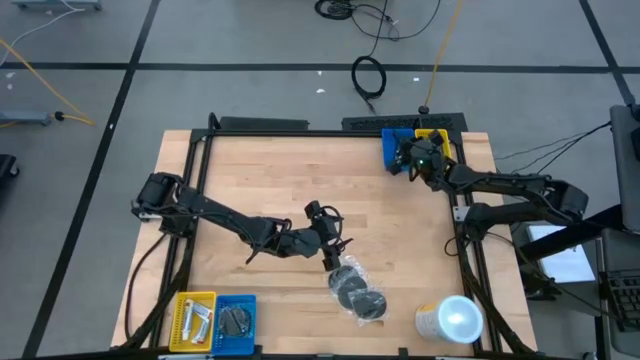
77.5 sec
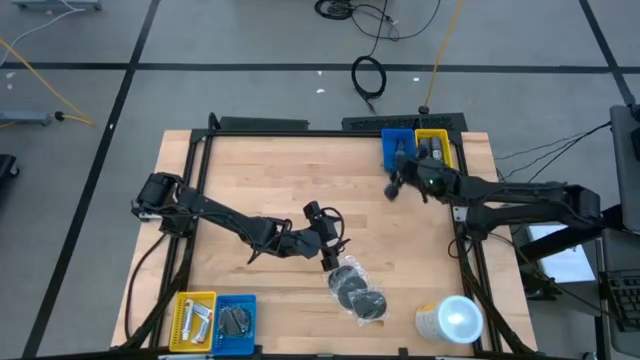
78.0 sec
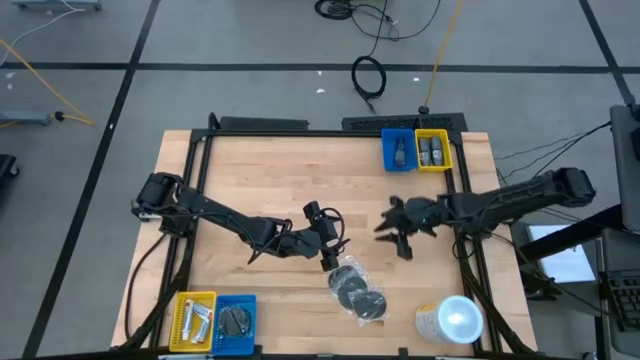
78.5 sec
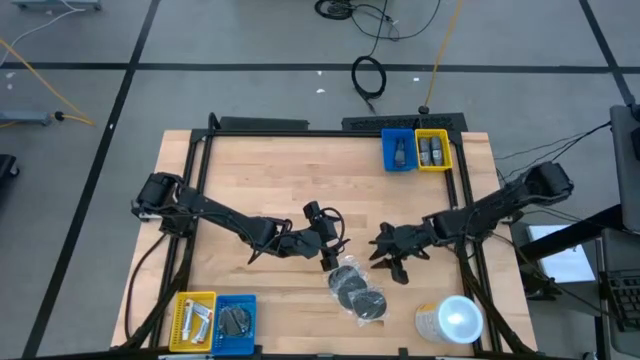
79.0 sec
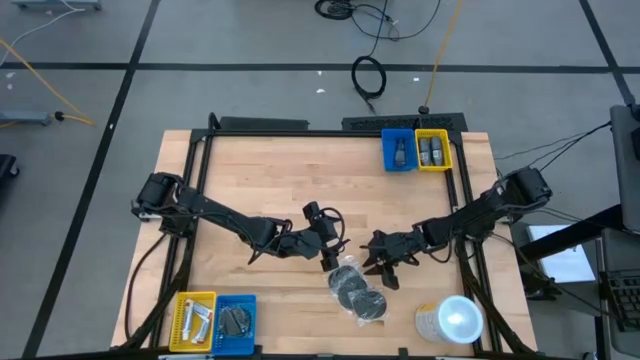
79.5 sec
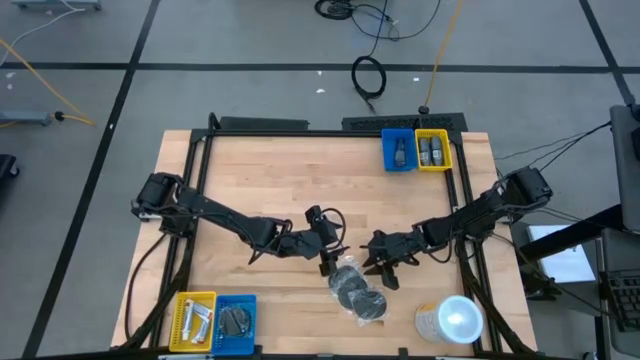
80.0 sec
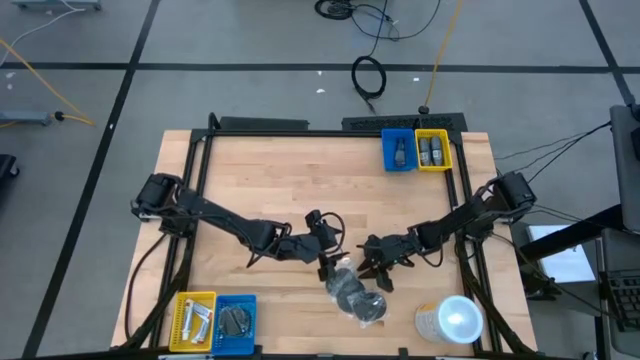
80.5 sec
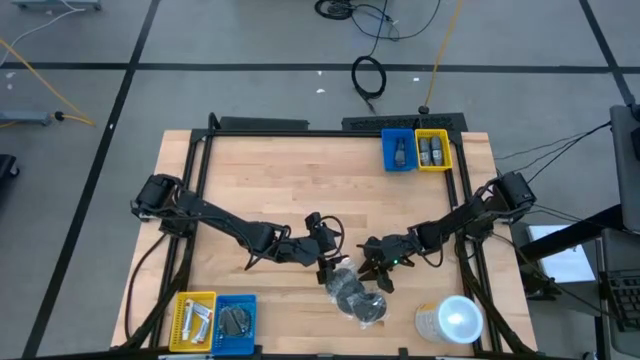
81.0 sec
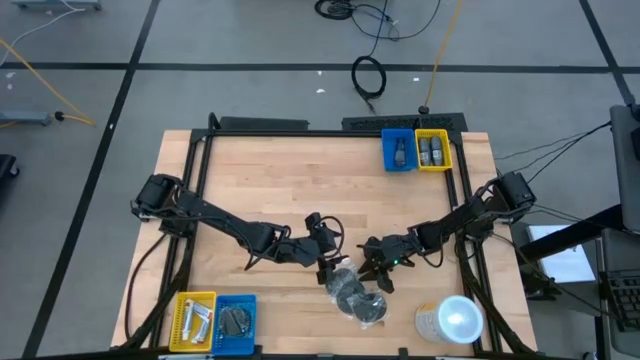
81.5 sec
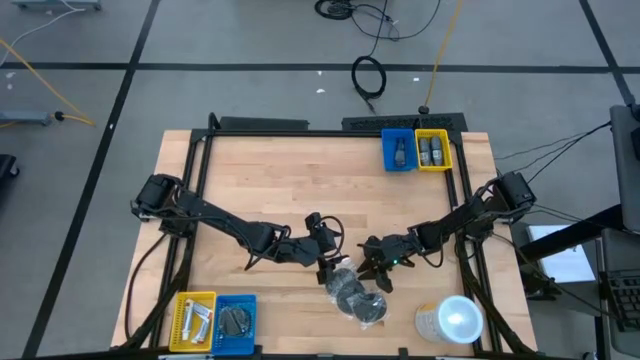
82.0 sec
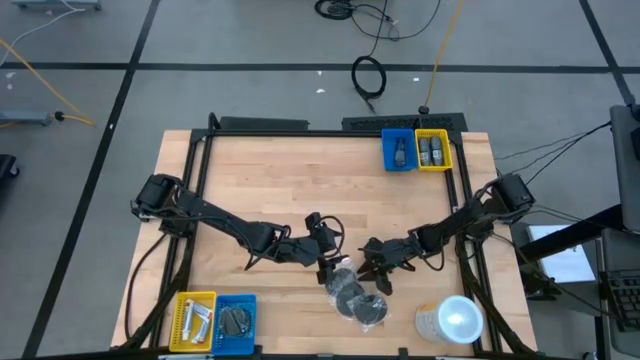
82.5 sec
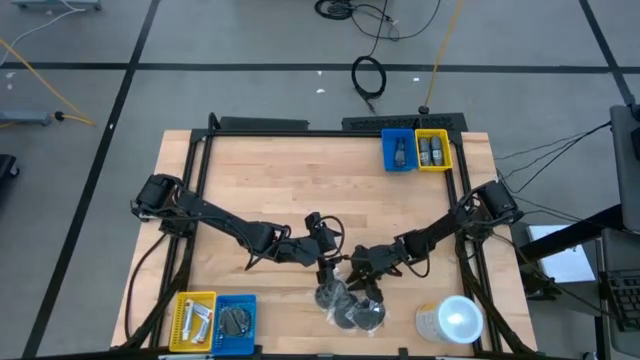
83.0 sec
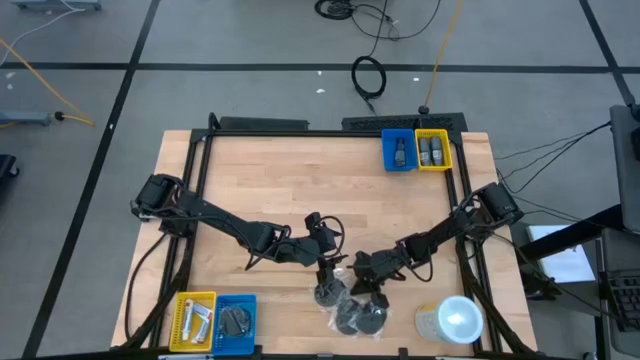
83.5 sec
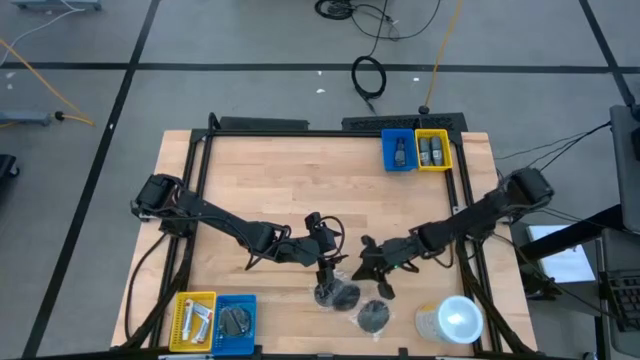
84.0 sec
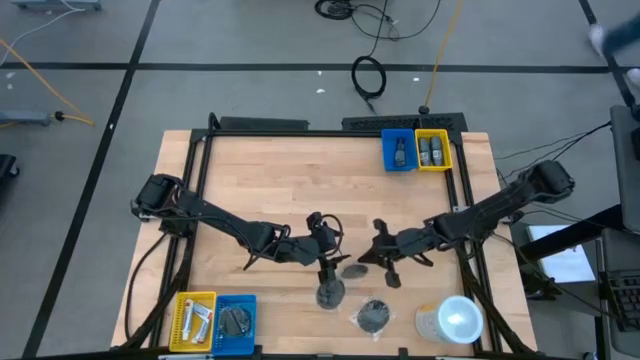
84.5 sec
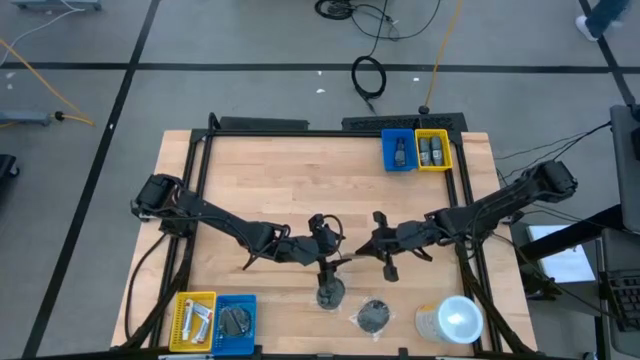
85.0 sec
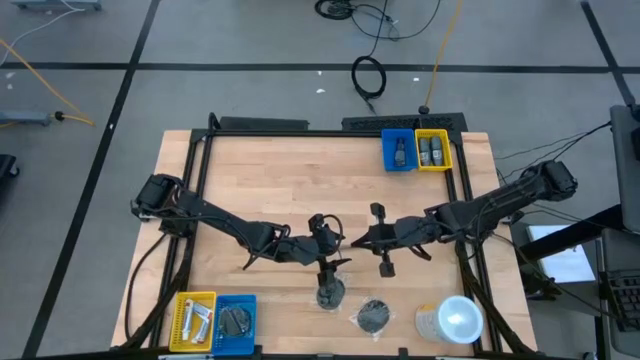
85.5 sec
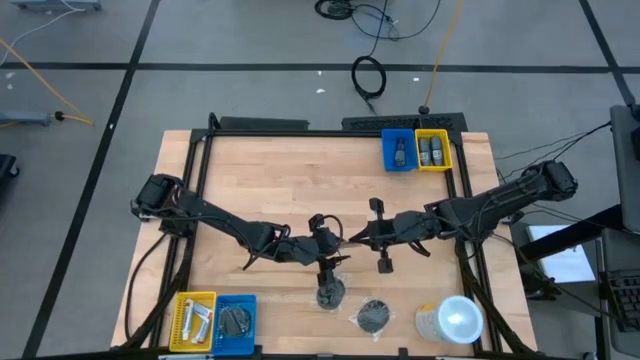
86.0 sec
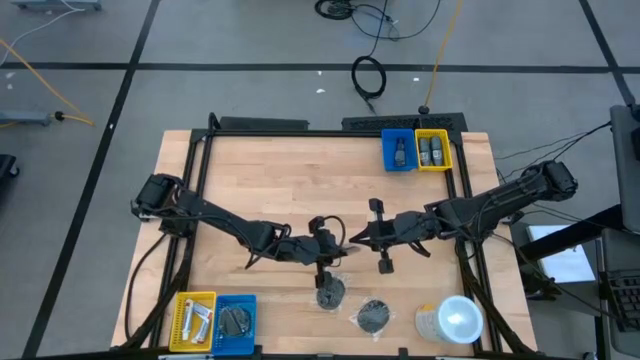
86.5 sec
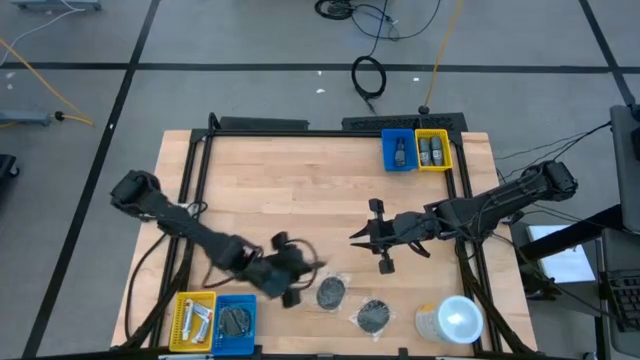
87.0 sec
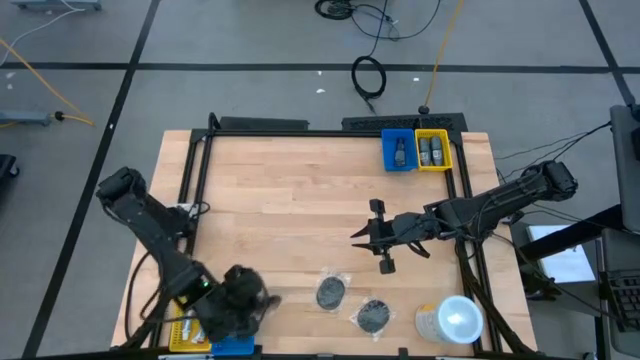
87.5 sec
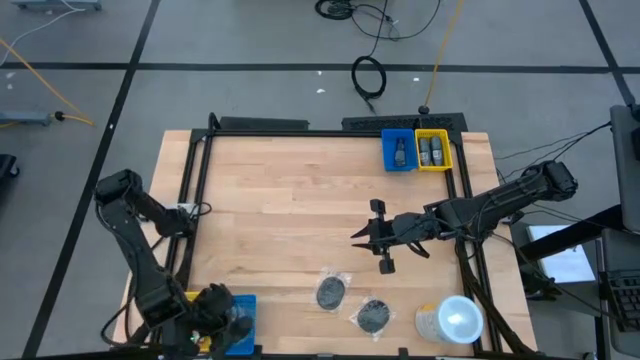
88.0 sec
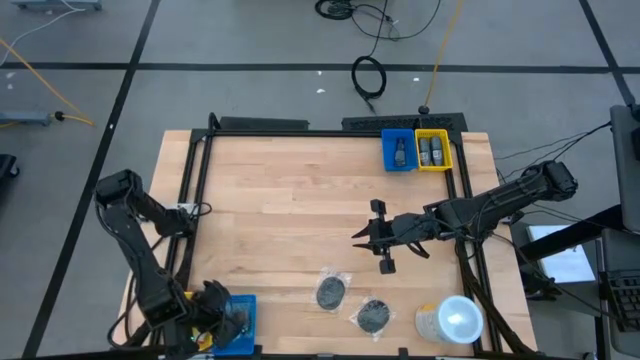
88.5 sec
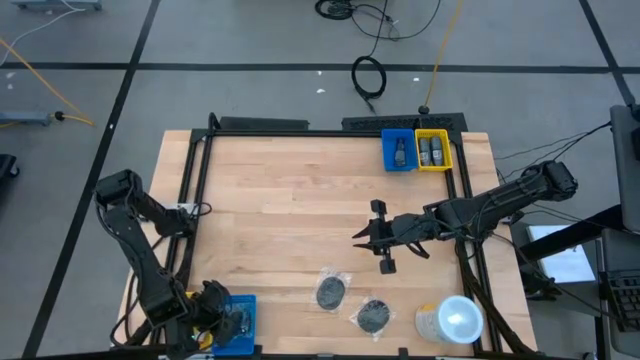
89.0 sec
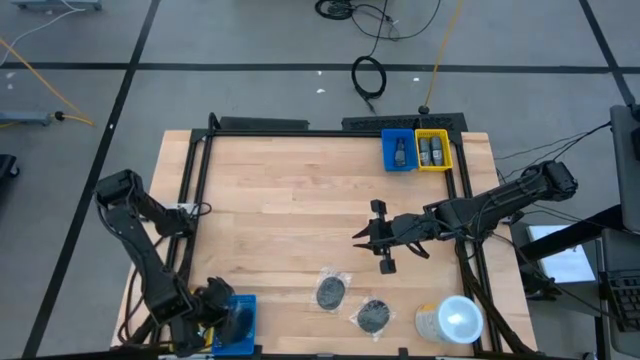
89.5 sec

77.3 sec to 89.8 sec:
Task: Pick & Place Travel size toiletries
Put the black hairbrush into the bottom blue bin

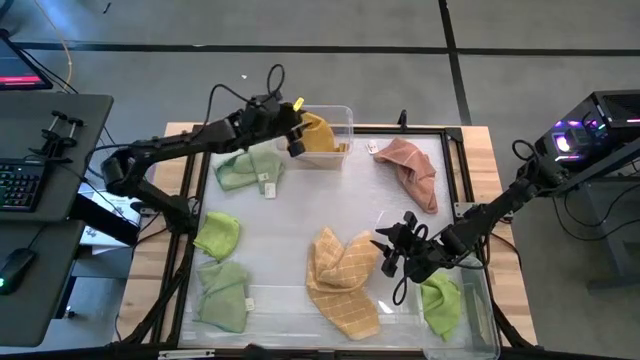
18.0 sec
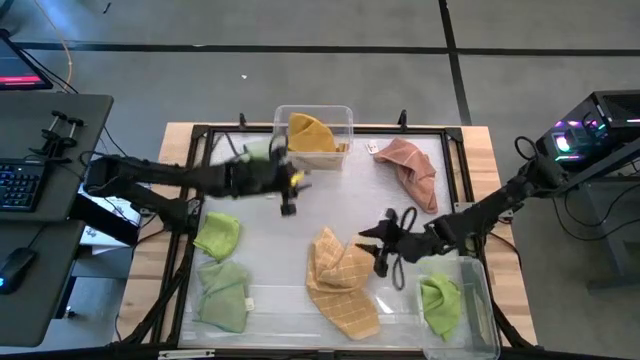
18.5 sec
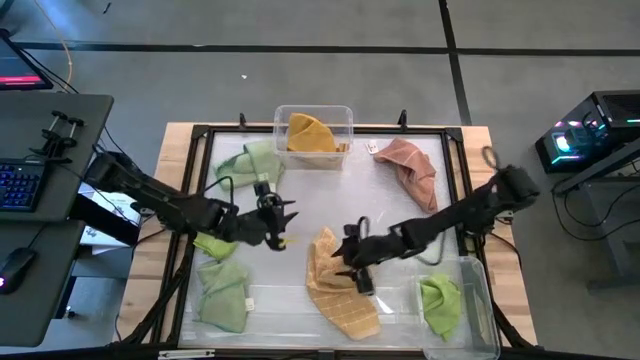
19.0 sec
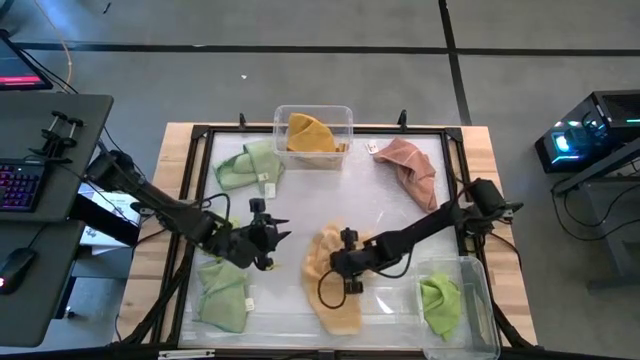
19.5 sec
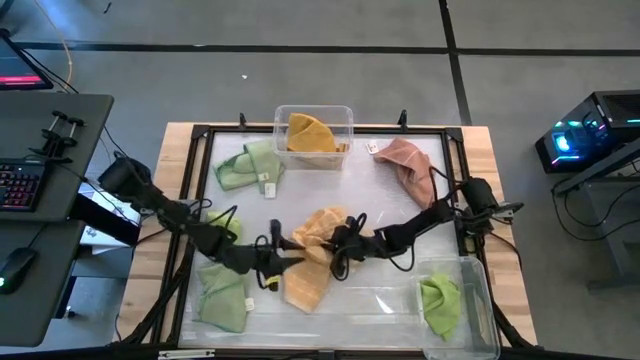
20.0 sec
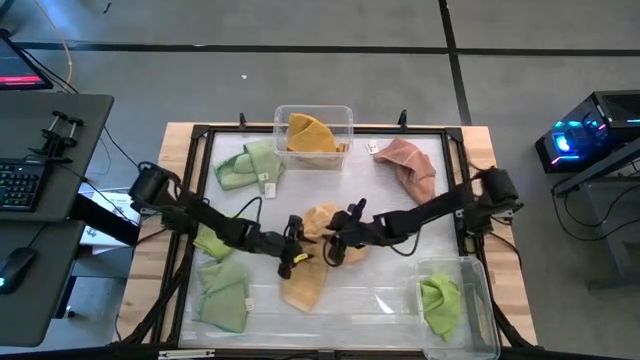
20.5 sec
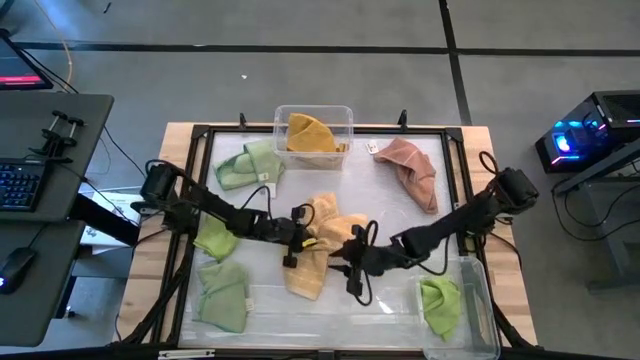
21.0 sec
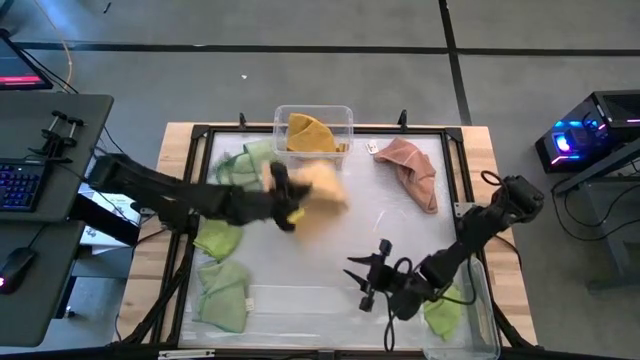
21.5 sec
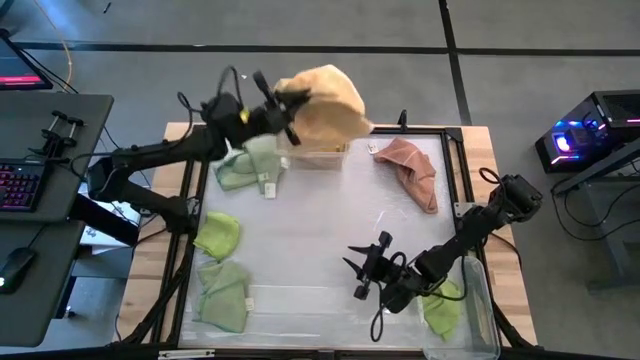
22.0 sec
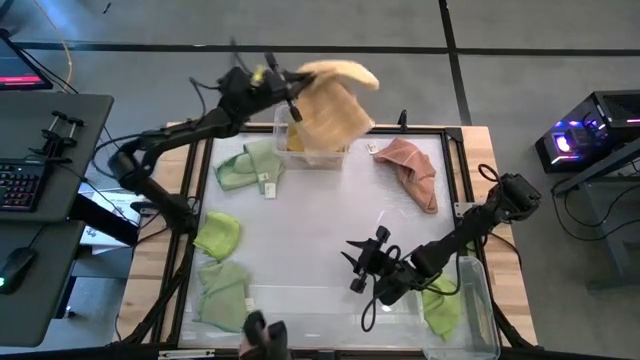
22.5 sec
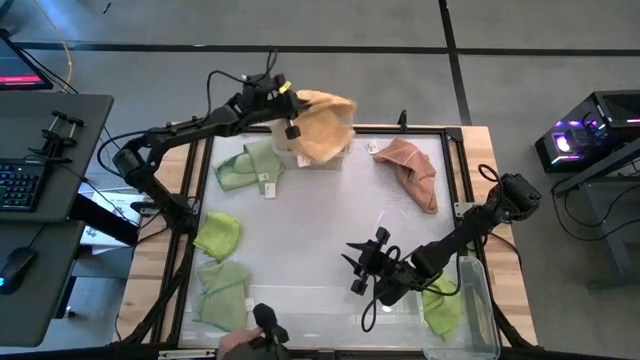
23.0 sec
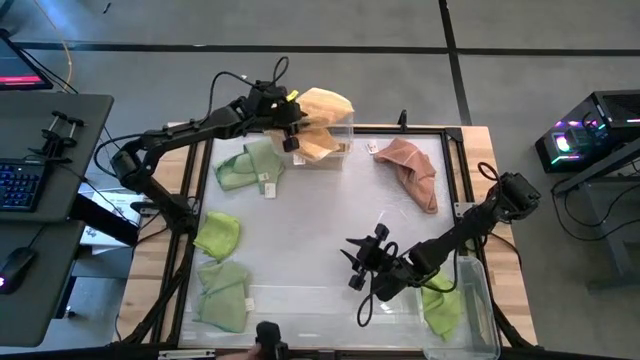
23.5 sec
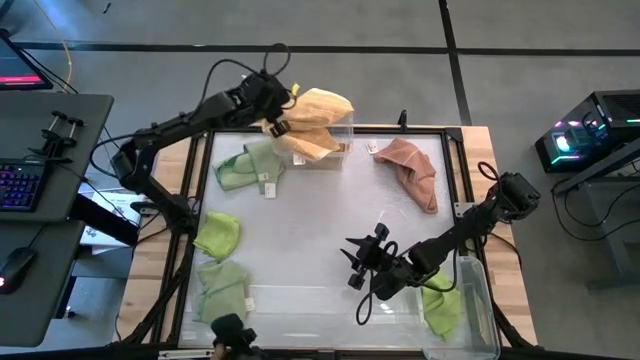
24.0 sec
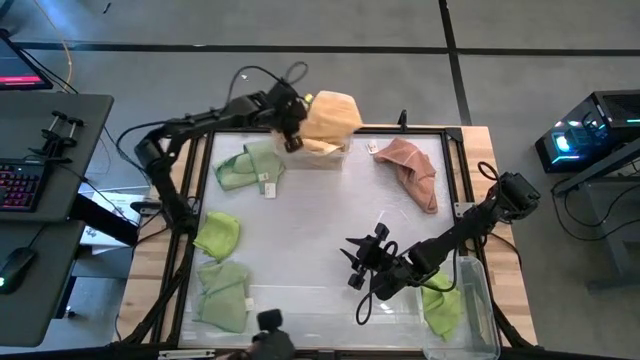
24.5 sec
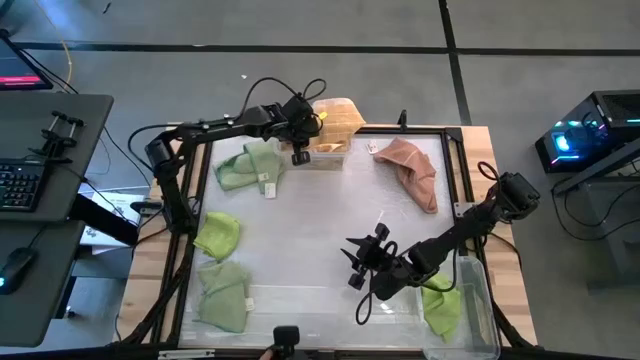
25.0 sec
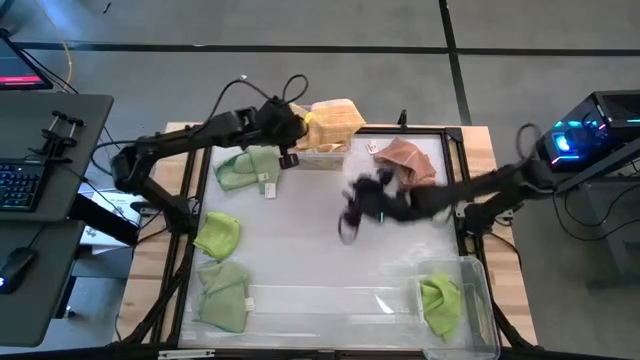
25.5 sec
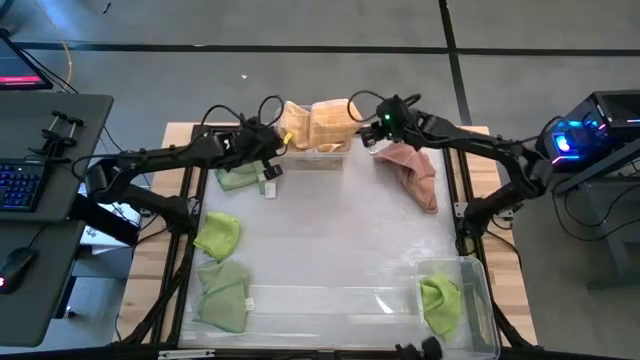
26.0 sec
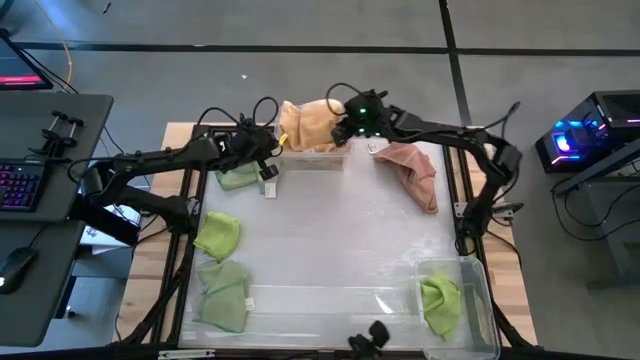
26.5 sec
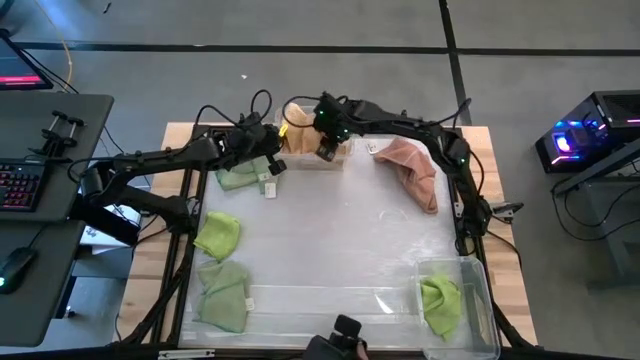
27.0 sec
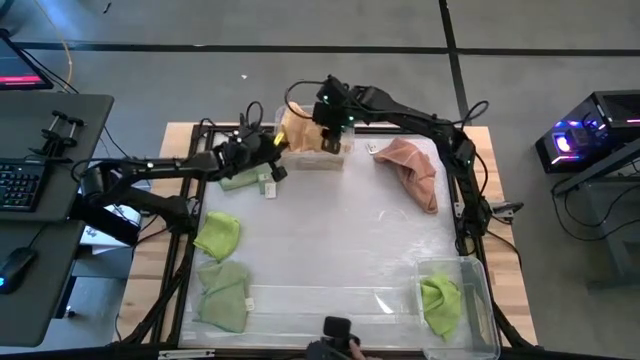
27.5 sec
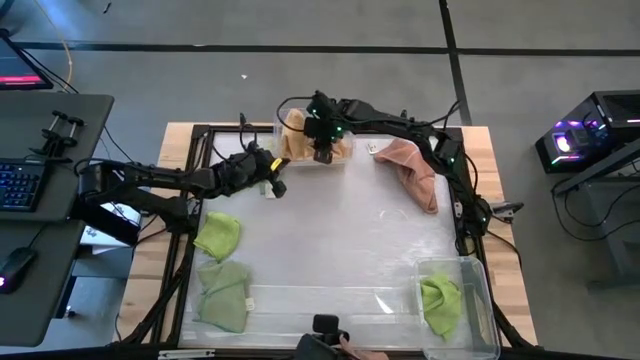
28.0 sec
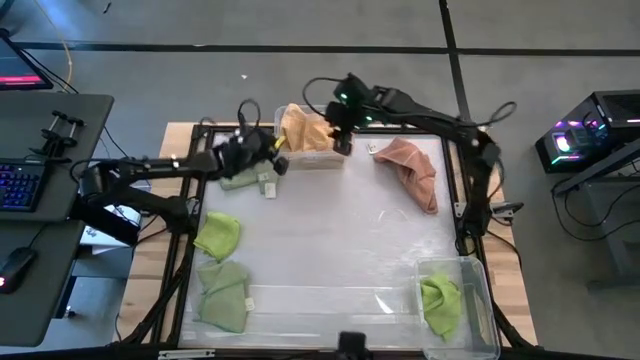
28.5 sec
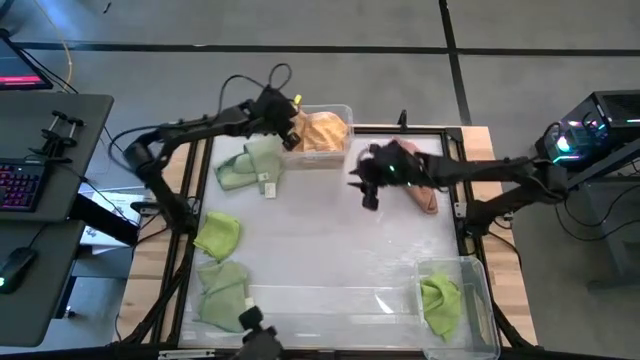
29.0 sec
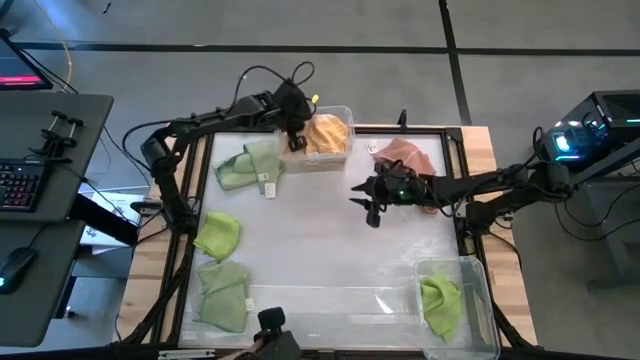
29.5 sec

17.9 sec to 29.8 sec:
Task: Sort towels by color in basket
Put the yellow patterned towel into the top transparent bin
